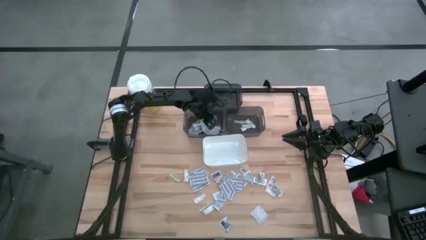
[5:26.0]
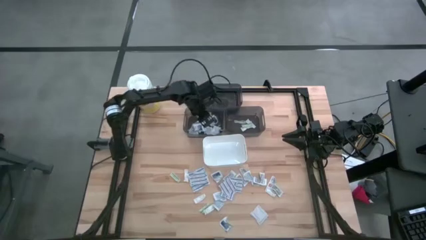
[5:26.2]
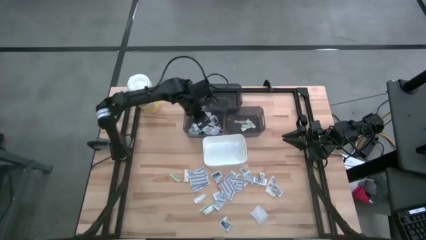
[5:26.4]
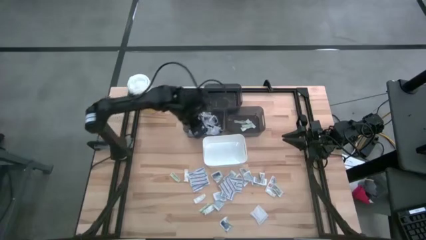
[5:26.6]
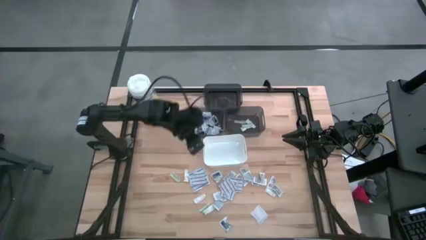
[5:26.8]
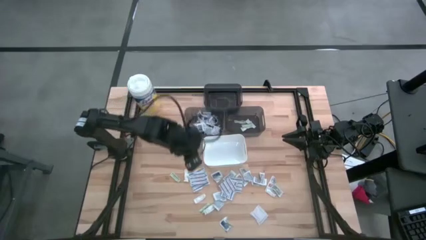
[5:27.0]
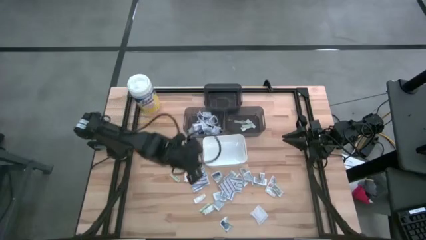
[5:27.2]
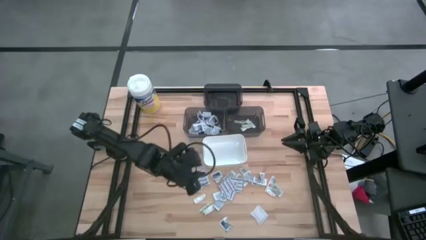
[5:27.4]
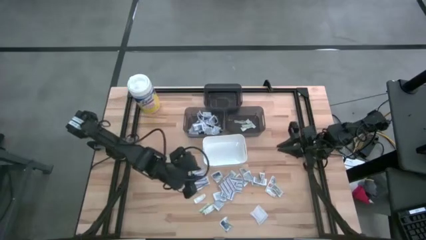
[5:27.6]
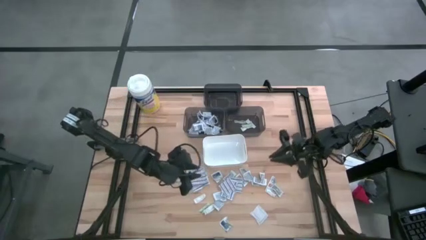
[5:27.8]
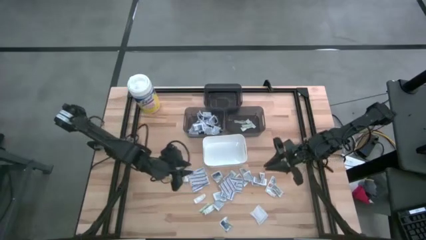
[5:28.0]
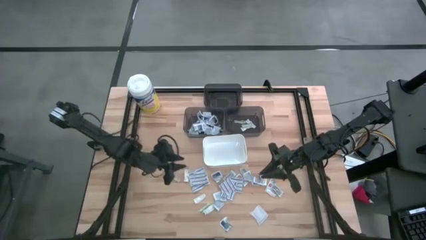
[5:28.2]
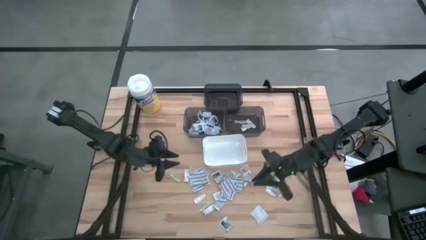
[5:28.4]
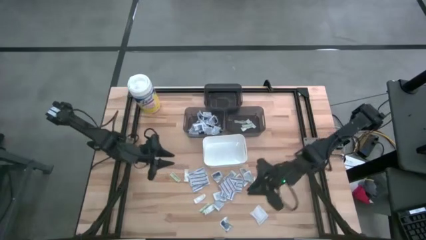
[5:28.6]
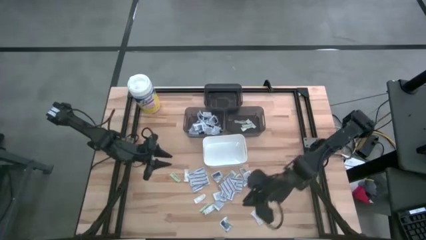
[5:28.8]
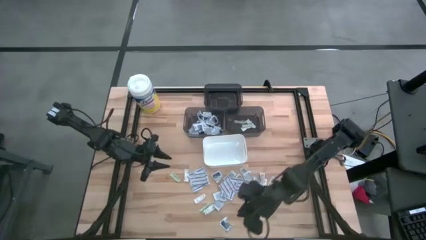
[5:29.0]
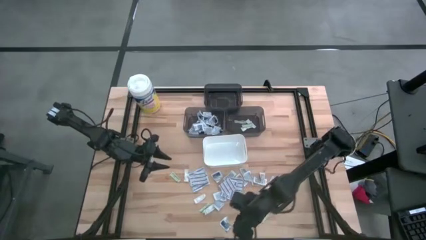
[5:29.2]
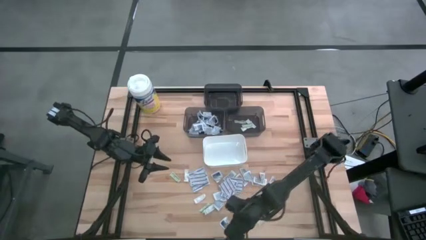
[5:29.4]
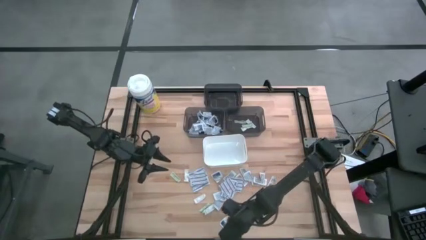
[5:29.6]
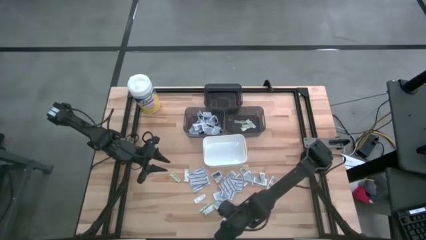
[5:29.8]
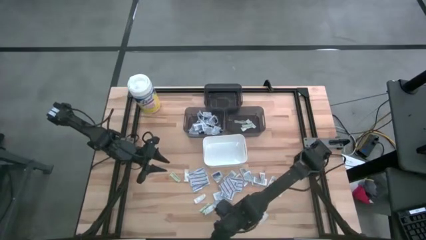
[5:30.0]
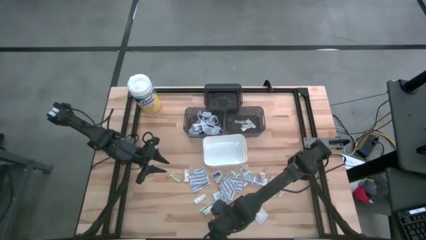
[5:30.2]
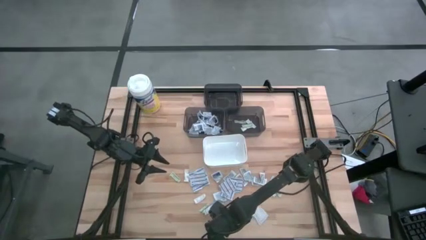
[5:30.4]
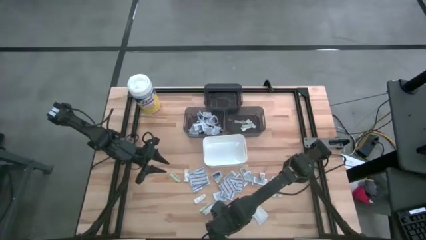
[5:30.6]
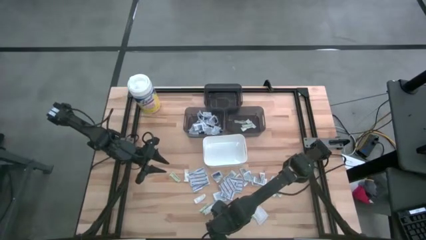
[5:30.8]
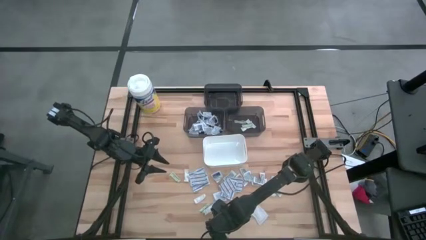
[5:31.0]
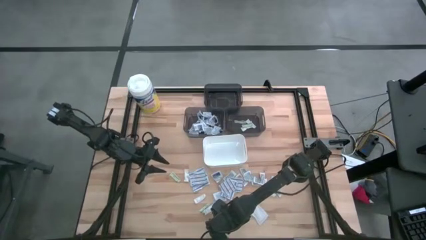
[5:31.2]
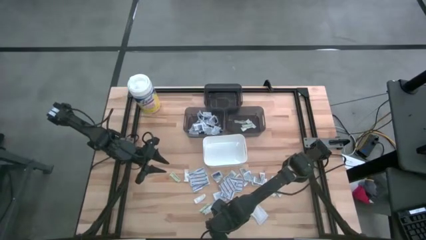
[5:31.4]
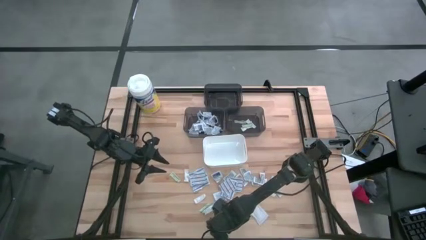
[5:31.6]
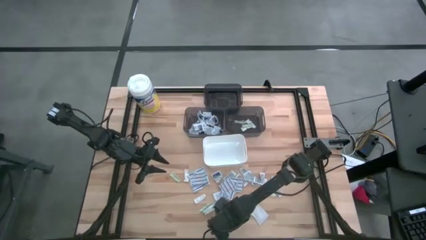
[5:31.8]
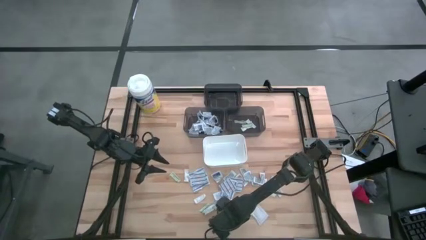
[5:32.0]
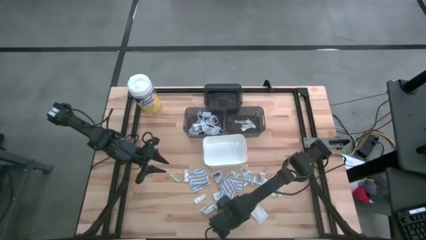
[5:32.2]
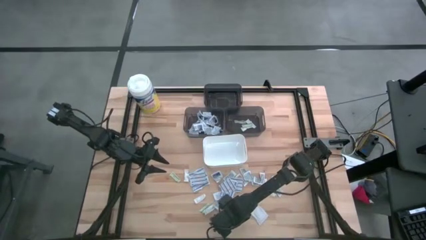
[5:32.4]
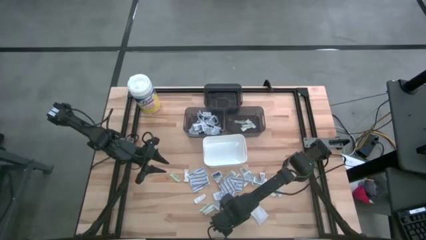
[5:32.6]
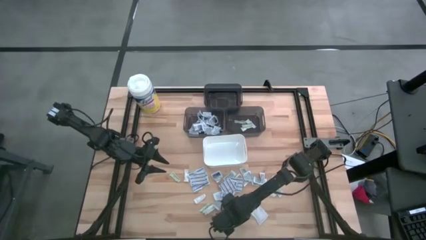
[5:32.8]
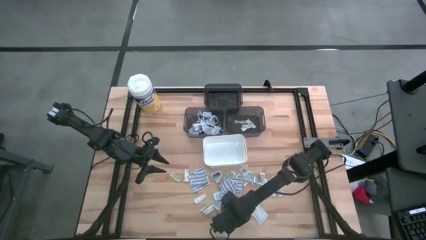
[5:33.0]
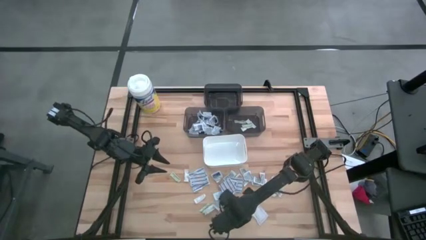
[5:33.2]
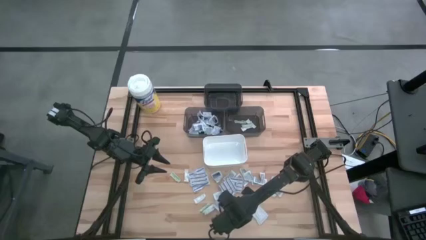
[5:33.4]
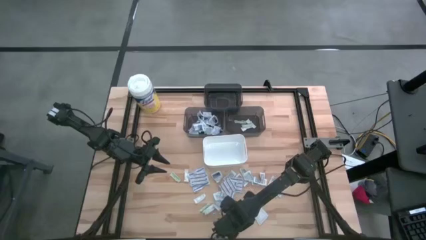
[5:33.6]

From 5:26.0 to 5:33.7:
Task: Pick & Place First Aid Supplies
Put the alcohol pad into the bottom left black bin

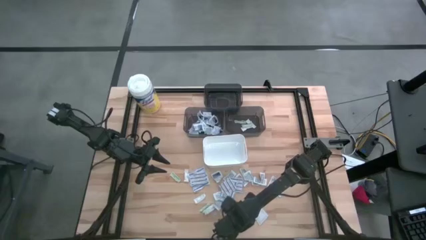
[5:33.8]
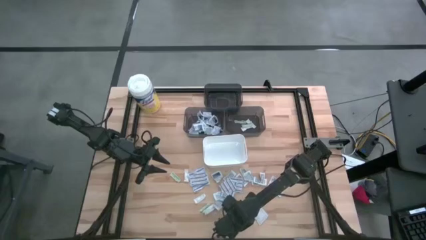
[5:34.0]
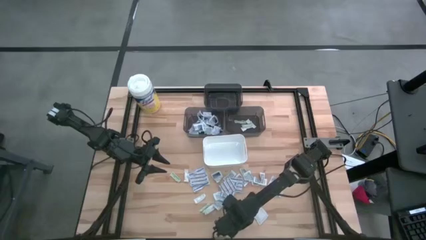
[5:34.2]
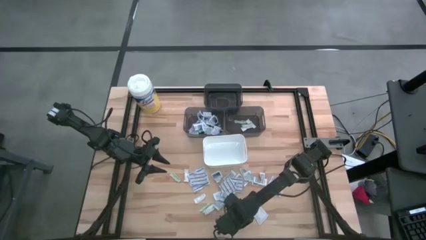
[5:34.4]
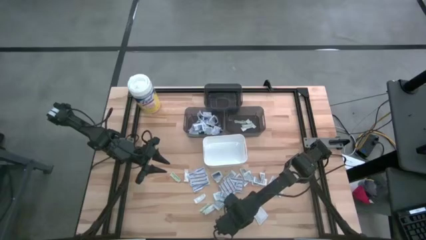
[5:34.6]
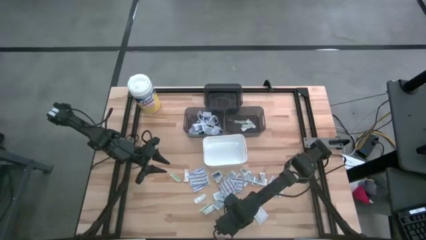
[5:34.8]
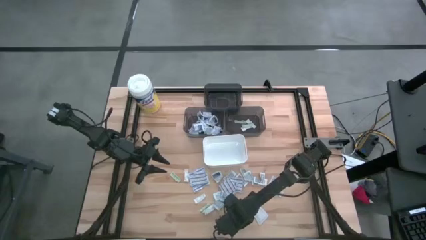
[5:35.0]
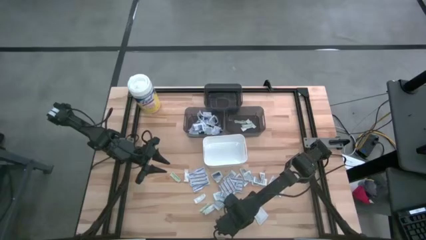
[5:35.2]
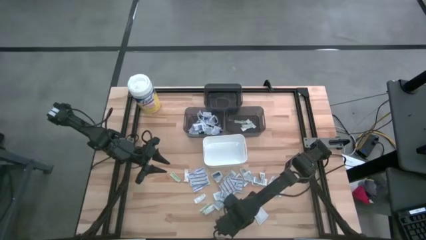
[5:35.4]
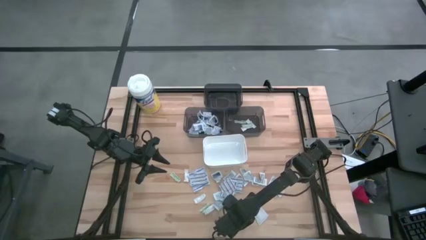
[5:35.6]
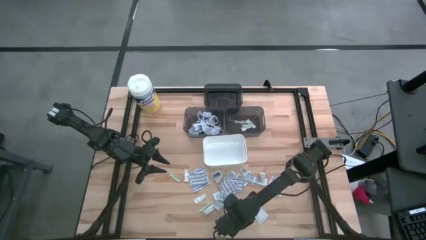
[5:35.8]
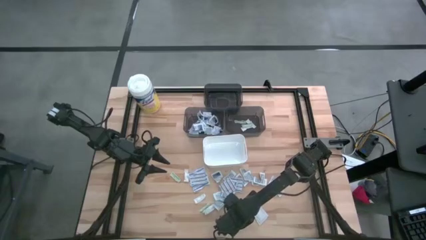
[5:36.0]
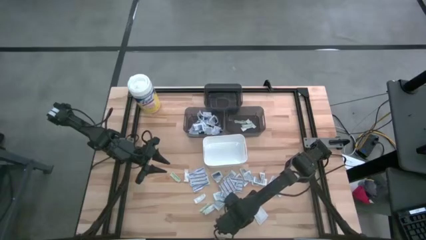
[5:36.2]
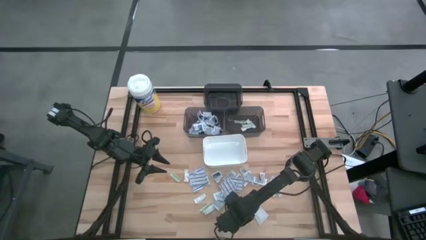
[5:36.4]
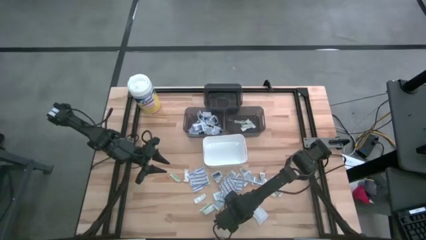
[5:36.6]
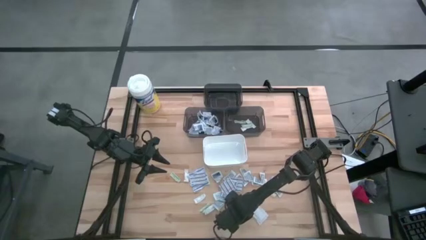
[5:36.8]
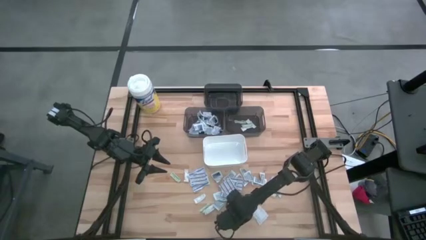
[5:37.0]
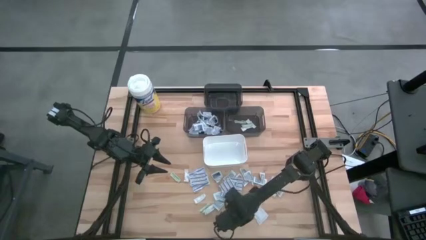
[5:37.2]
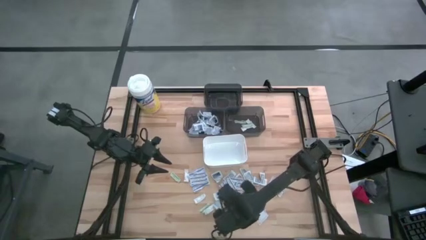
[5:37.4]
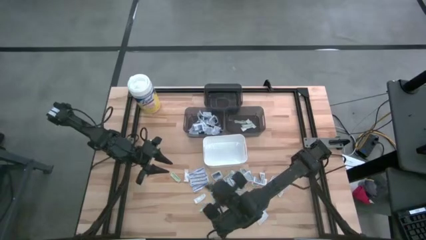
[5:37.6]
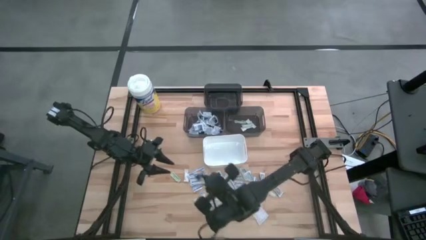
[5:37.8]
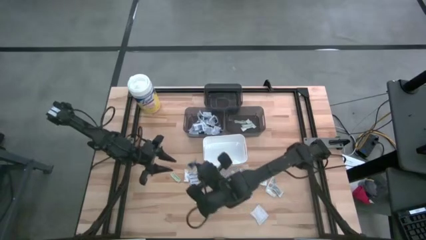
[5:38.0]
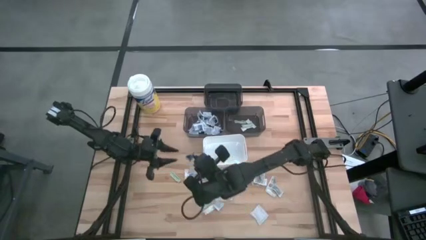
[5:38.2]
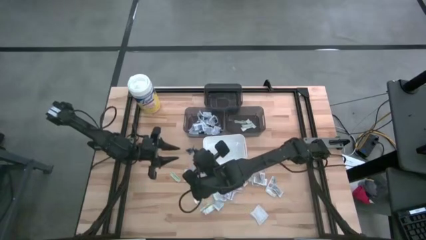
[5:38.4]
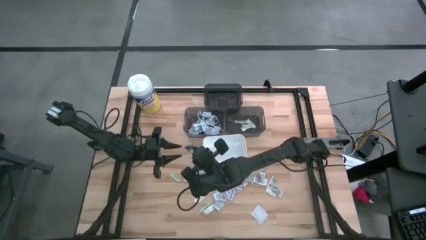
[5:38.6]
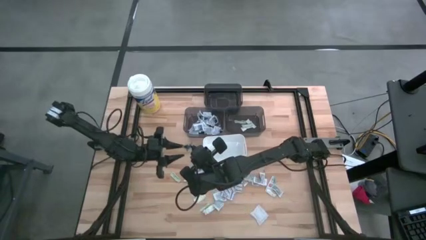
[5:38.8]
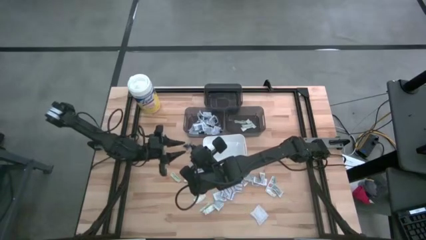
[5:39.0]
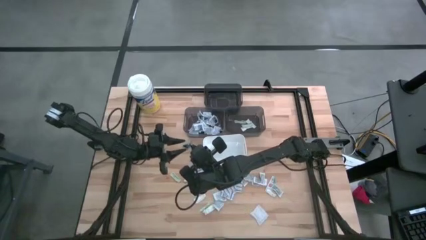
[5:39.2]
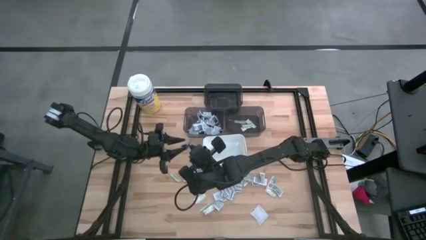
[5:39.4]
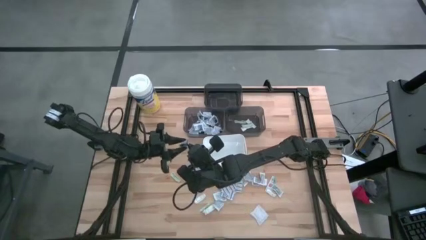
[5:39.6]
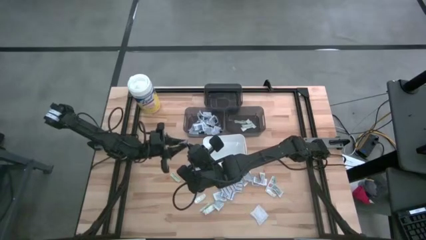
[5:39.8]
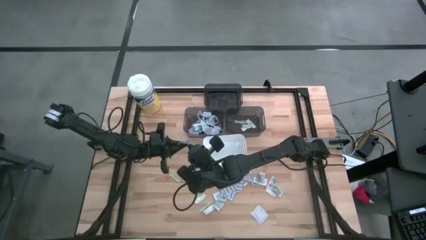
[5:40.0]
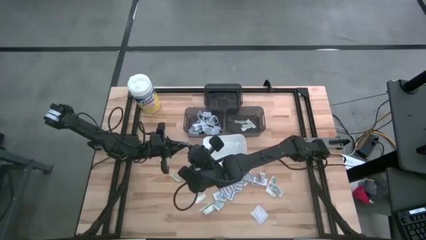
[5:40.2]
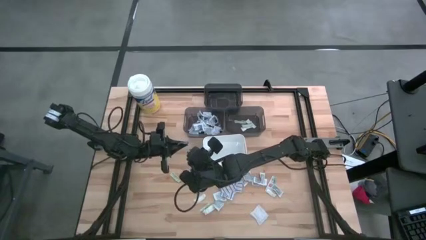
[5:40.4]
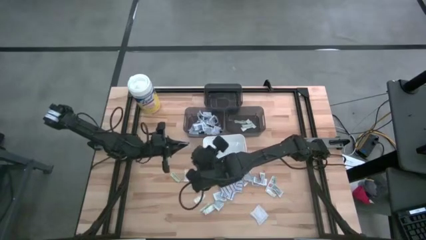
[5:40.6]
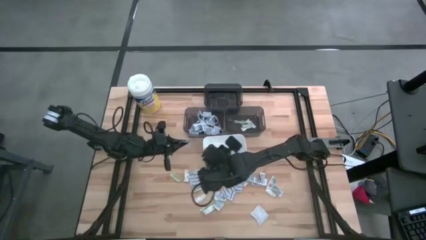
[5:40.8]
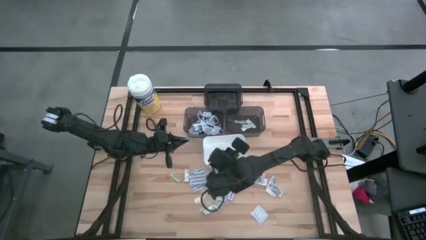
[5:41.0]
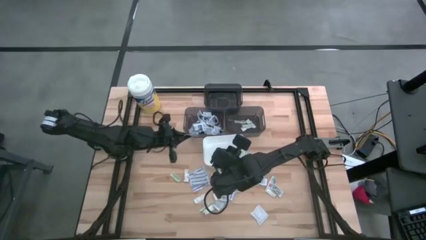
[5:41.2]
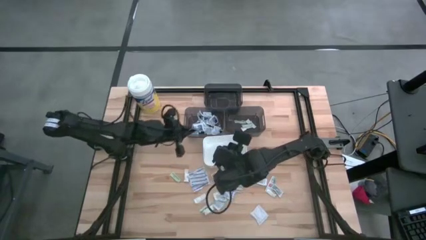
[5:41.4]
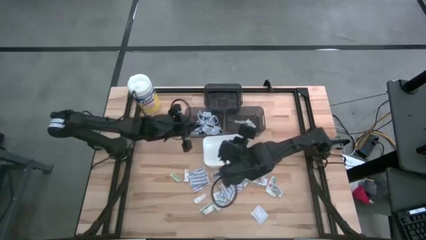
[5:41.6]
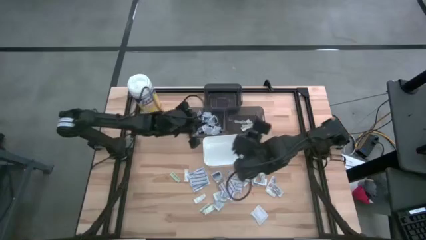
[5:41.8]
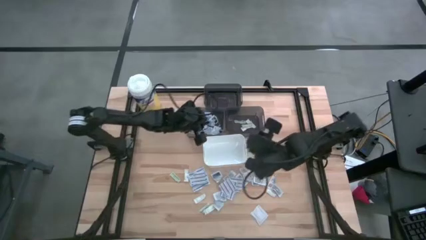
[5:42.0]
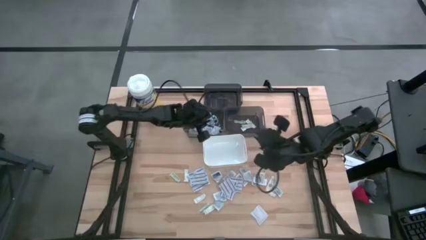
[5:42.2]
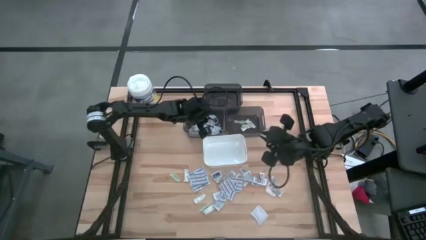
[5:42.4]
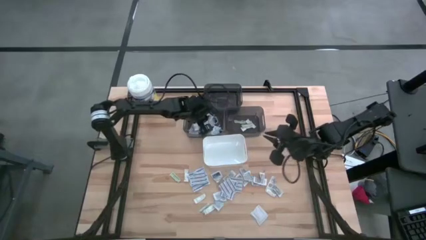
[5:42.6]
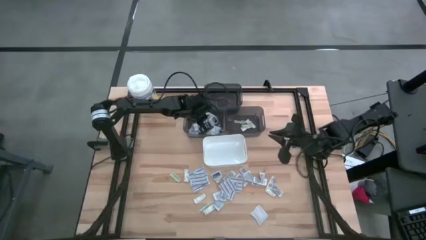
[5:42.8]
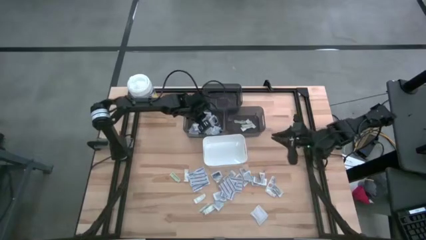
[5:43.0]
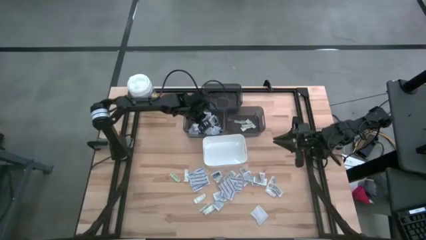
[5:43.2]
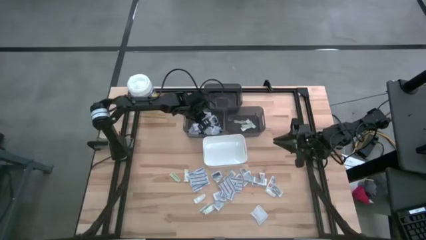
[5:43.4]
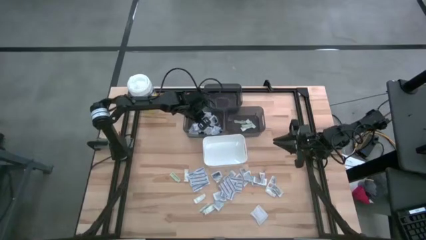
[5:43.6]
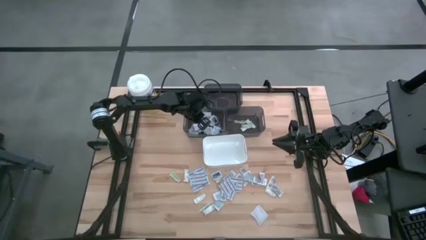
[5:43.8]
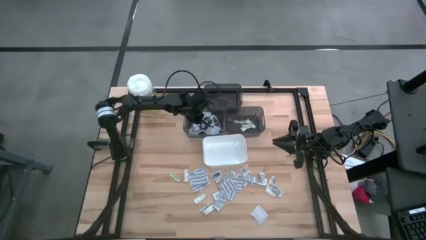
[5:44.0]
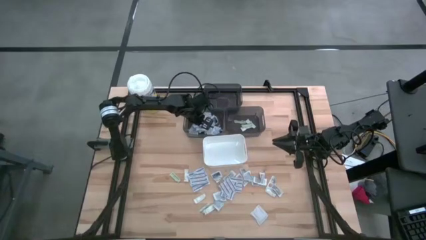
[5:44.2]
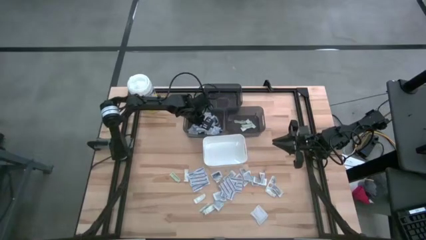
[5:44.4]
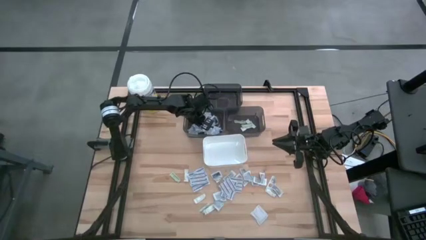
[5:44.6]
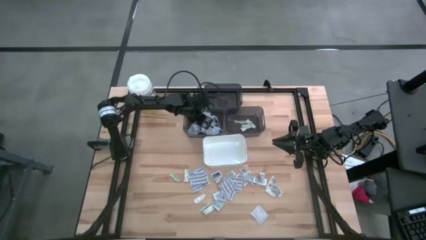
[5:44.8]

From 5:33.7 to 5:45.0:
Put the alcohol pad into the bottom left black bin
